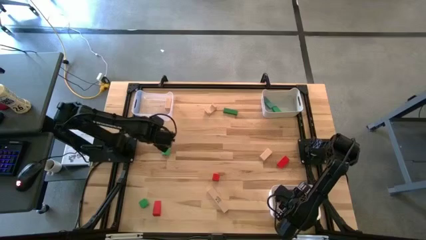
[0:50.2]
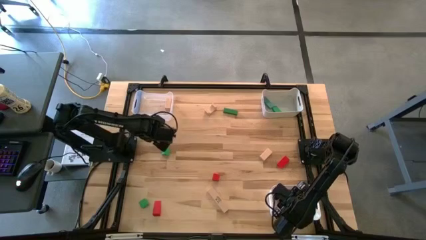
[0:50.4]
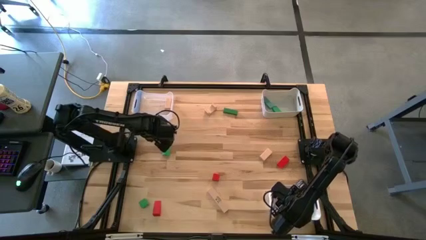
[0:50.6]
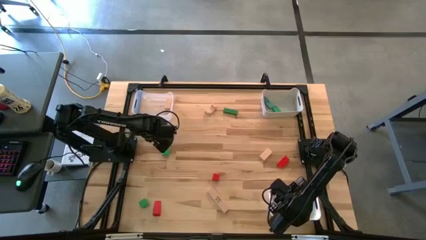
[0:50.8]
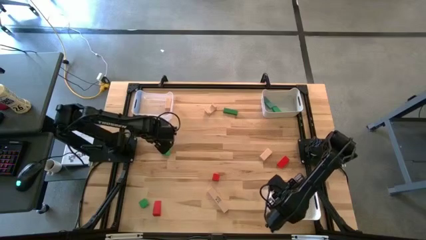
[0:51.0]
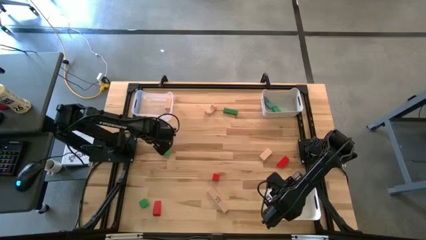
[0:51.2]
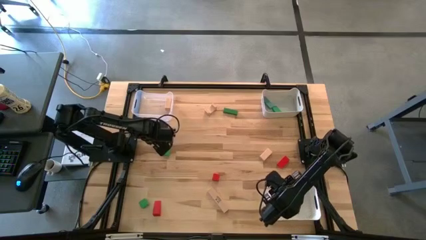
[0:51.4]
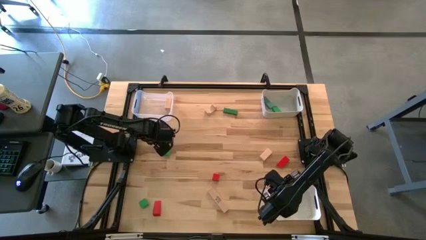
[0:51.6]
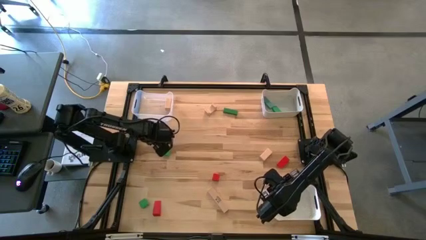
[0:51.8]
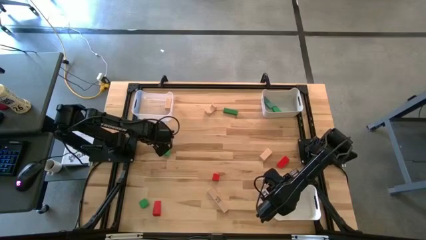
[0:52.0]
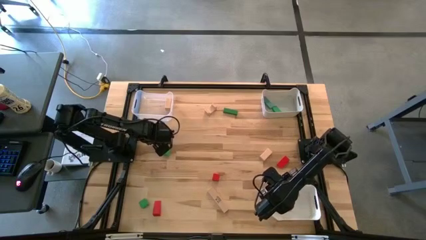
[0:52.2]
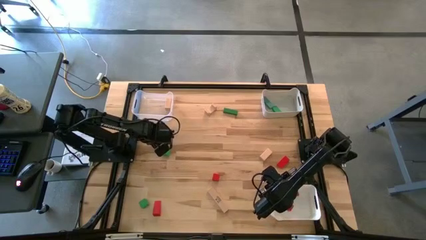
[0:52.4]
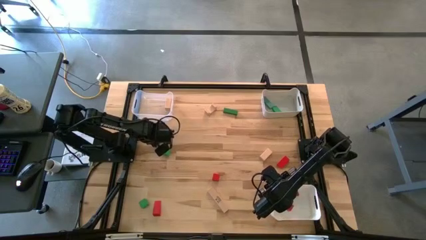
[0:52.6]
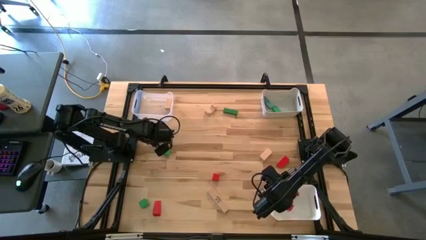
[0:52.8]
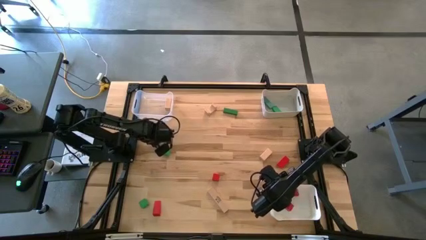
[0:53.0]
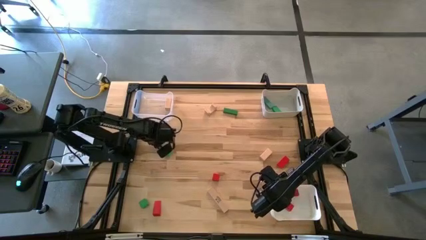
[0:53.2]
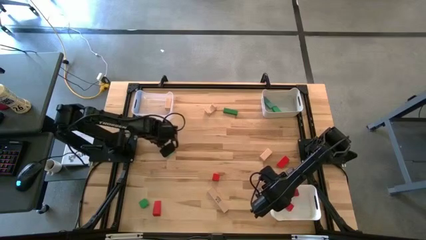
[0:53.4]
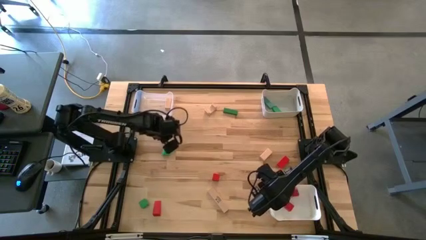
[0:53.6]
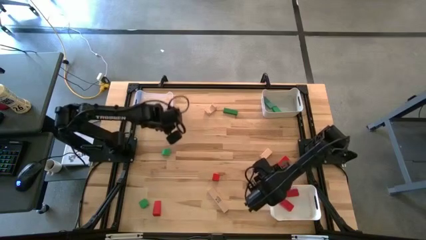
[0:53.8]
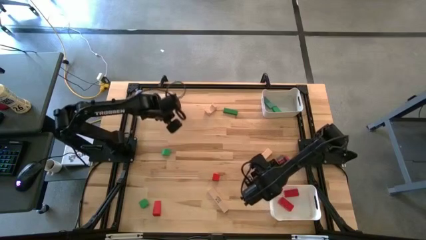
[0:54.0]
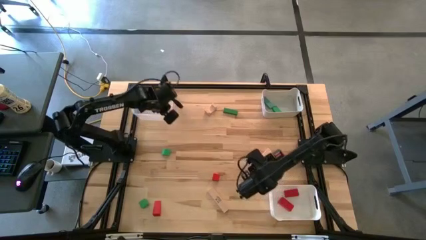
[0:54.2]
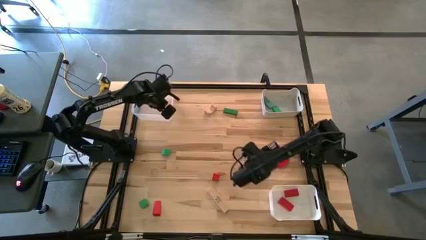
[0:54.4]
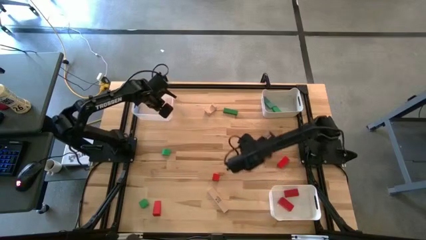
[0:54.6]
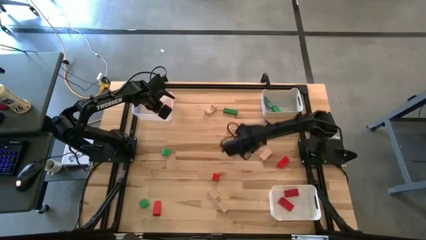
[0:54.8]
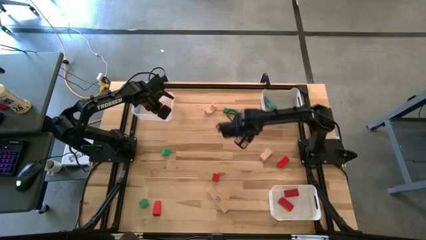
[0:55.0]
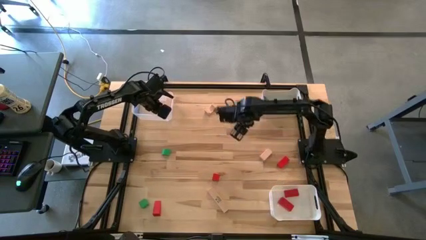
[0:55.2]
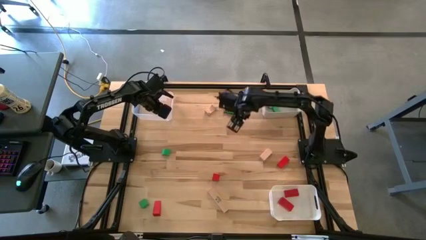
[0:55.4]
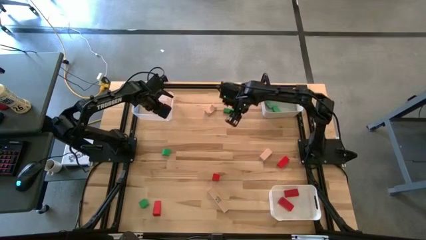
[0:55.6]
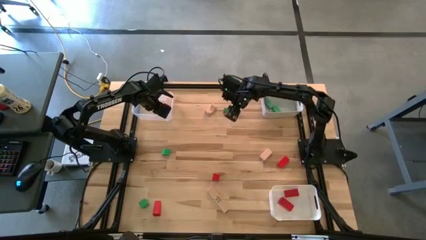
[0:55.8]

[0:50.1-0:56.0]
Task: Sort & place blocks by color
Put the brown block into the transparent bin

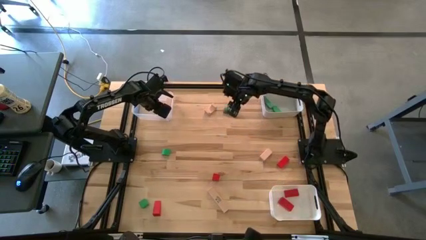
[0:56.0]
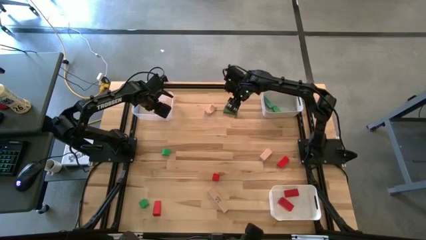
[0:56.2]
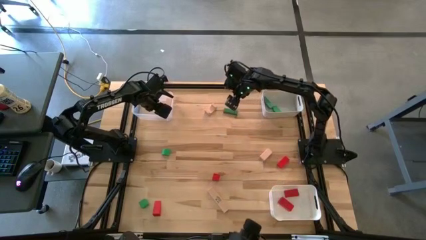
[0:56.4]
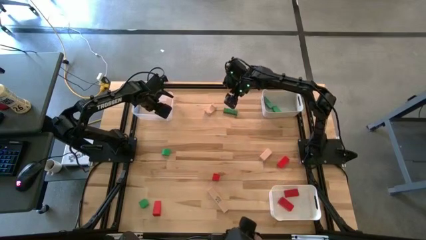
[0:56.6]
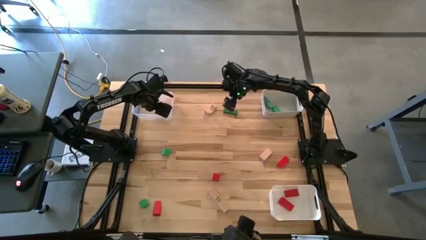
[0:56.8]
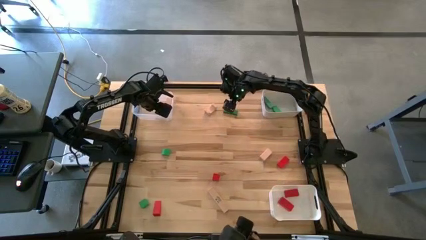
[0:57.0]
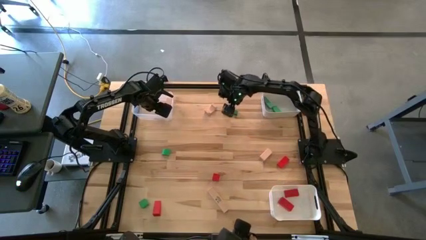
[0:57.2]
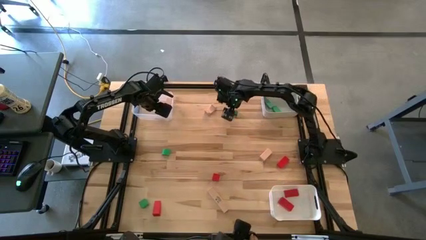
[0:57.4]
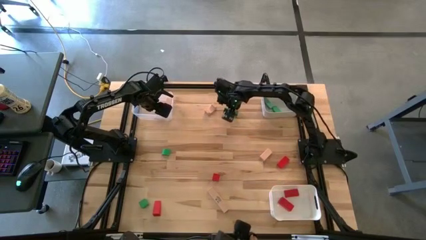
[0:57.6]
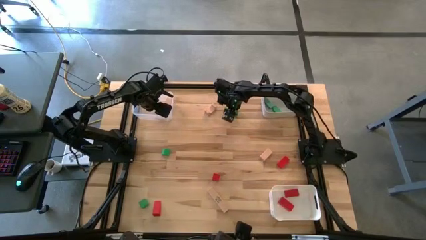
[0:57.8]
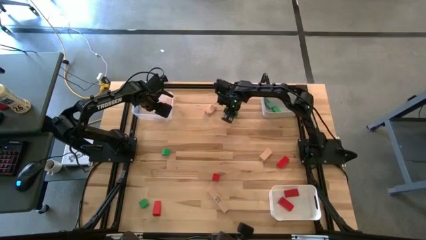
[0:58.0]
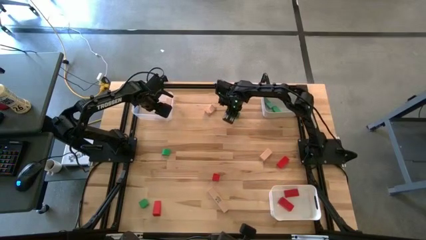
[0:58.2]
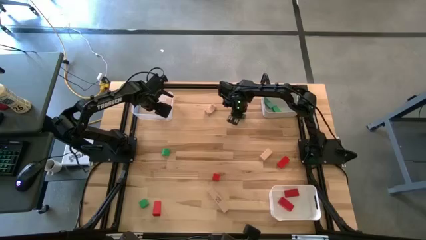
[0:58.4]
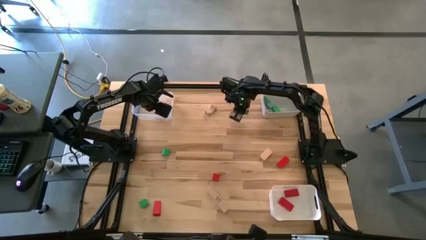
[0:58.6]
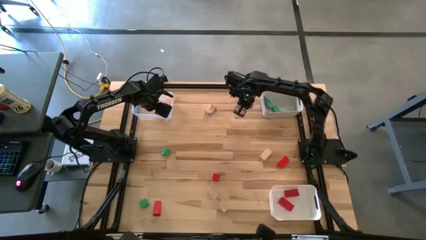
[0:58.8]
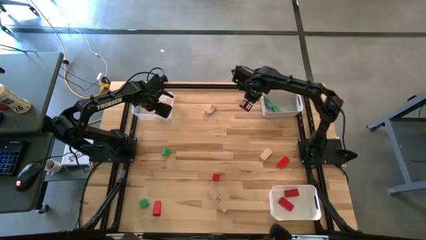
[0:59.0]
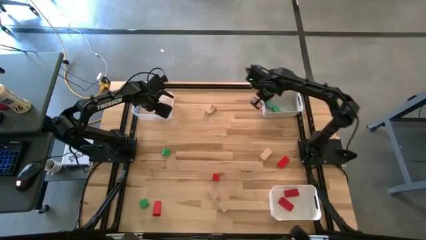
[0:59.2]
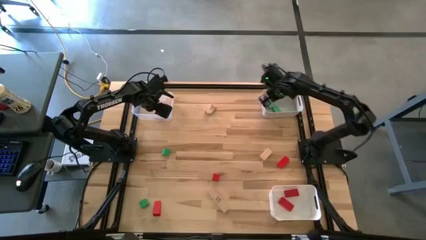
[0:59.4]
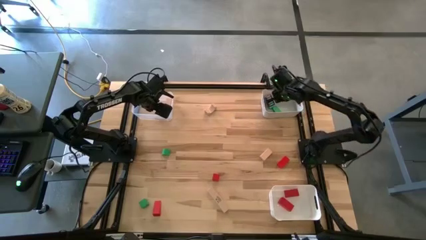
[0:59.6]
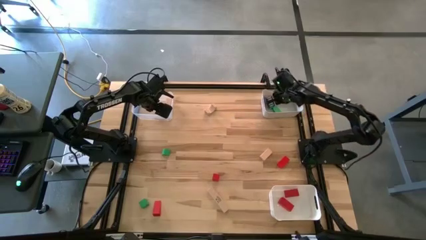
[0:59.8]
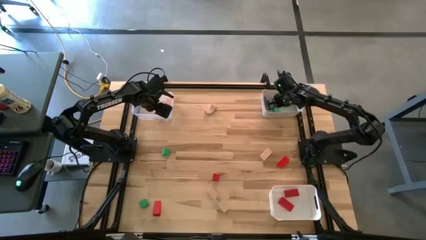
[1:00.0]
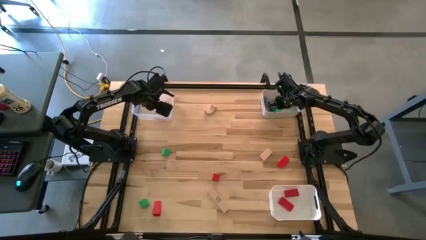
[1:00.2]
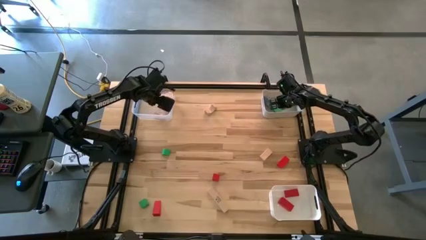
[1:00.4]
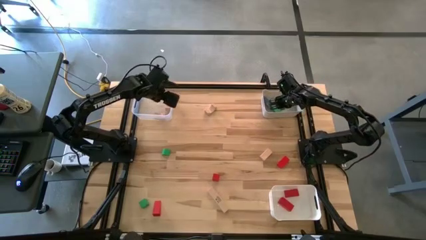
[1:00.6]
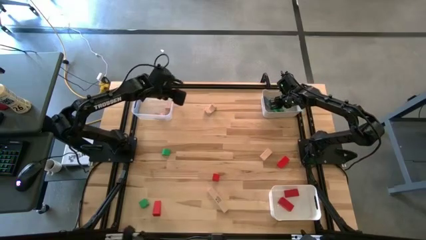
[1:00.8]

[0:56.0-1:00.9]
Put the green block into the gray bin

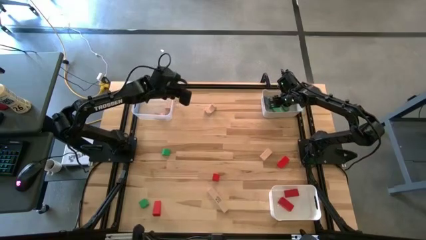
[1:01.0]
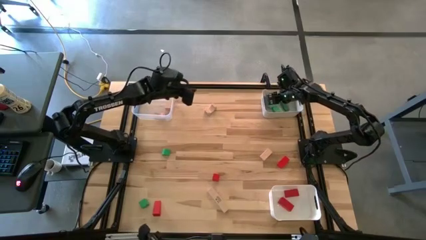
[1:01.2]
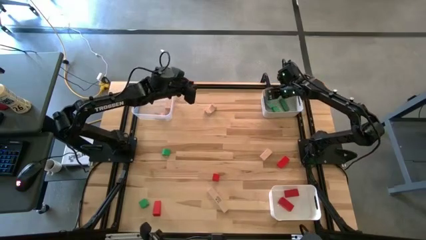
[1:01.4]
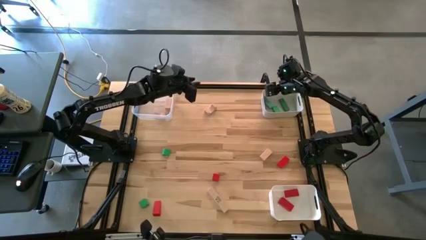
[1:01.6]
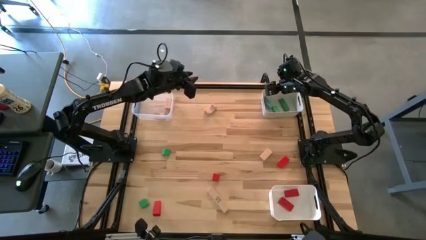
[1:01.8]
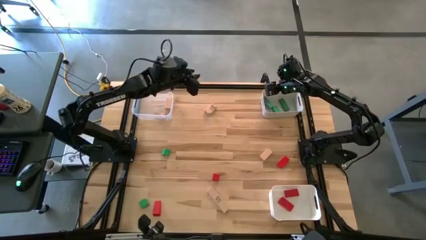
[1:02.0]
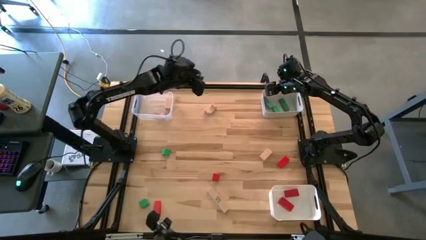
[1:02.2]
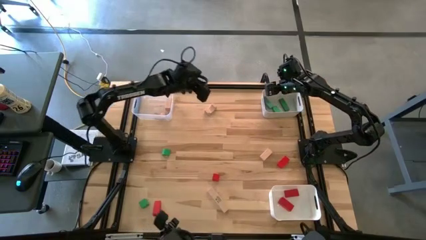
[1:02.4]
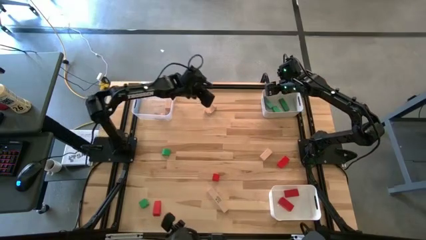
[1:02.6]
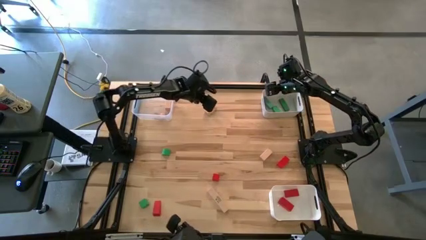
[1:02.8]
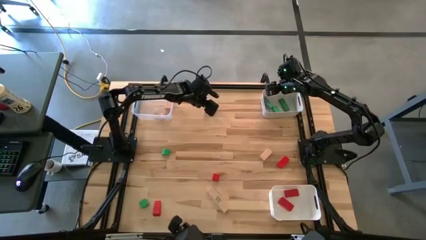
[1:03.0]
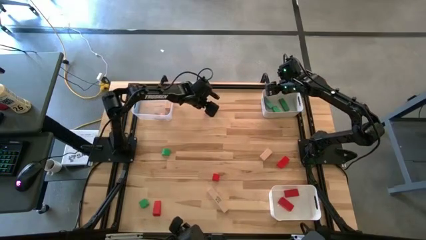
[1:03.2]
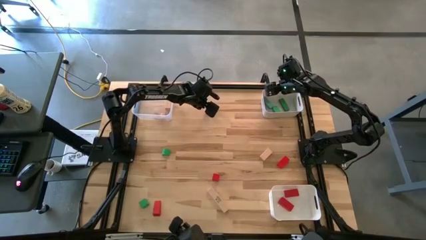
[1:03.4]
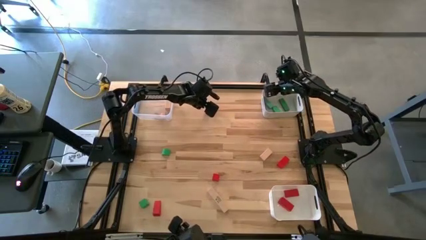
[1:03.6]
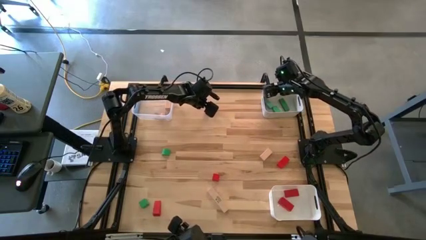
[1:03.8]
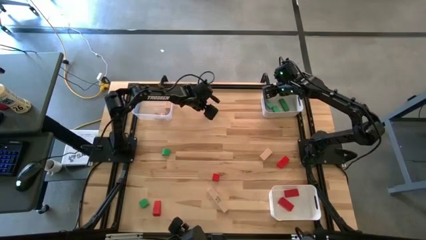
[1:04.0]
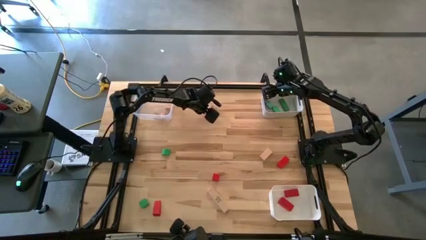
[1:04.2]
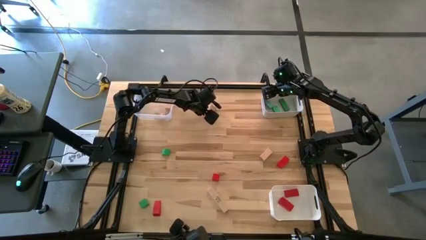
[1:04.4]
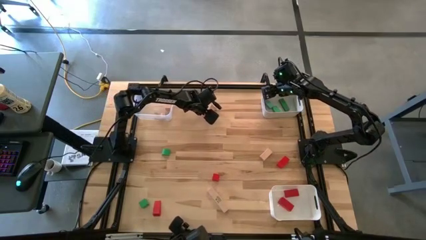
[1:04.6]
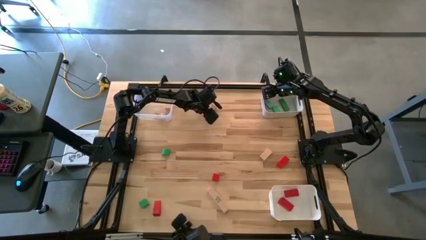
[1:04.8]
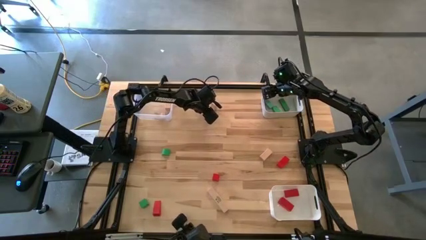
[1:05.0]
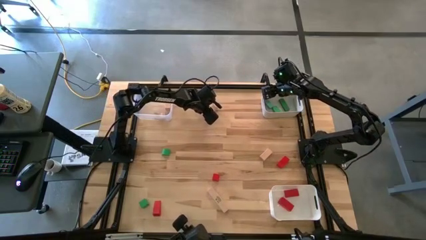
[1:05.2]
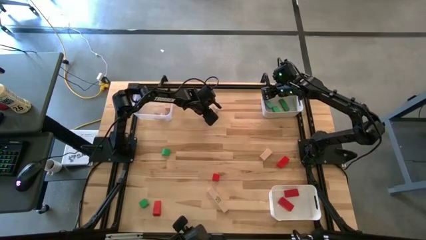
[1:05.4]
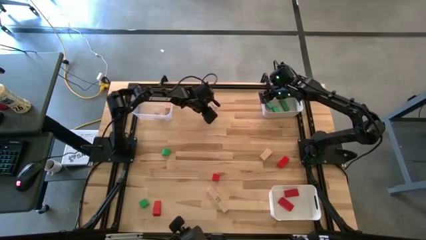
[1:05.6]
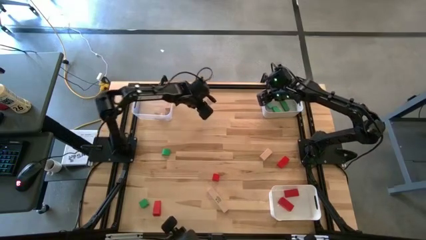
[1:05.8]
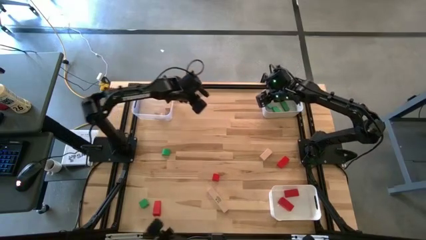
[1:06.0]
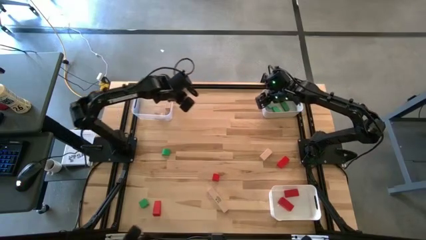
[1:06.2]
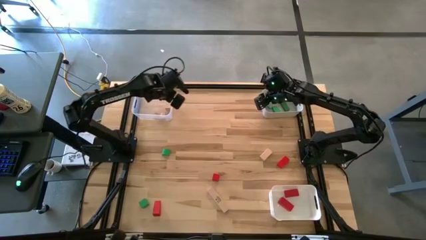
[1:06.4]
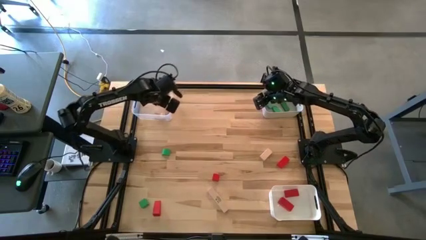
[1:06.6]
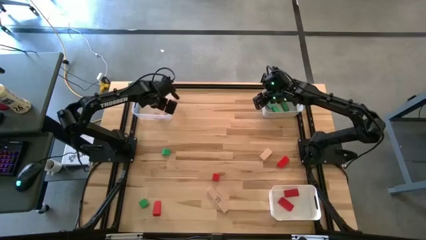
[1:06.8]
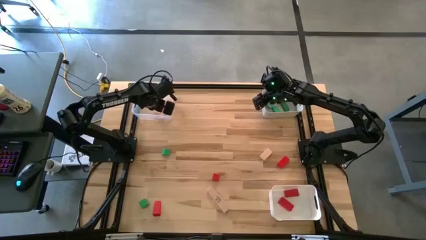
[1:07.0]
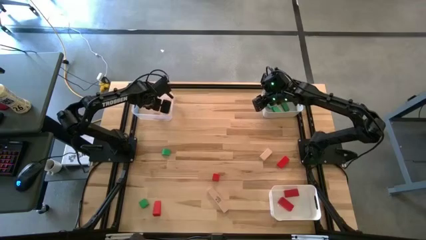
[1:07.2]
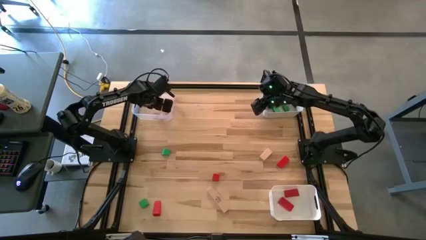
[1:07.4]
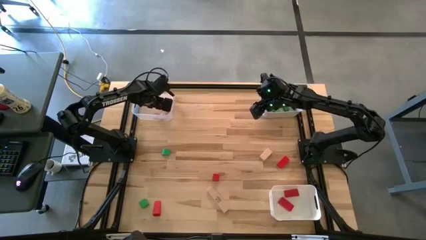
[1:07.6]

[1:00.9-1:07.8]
Put the brown block into the transparent bin
